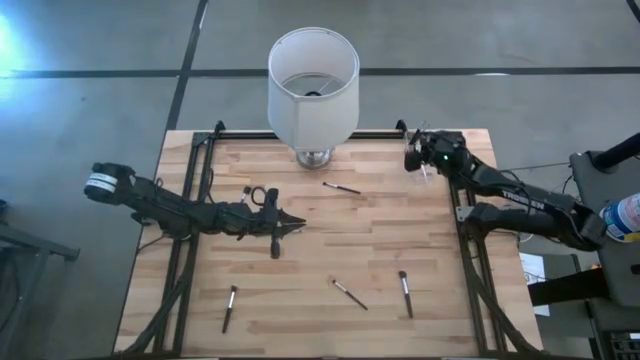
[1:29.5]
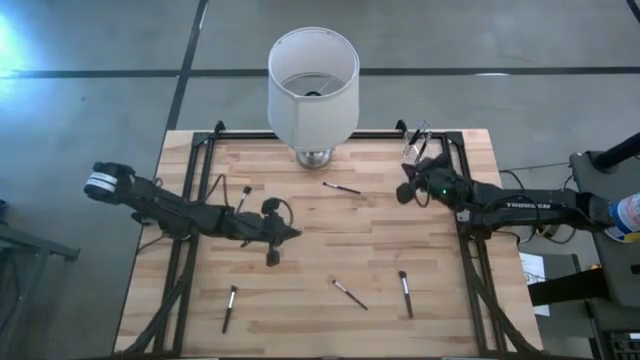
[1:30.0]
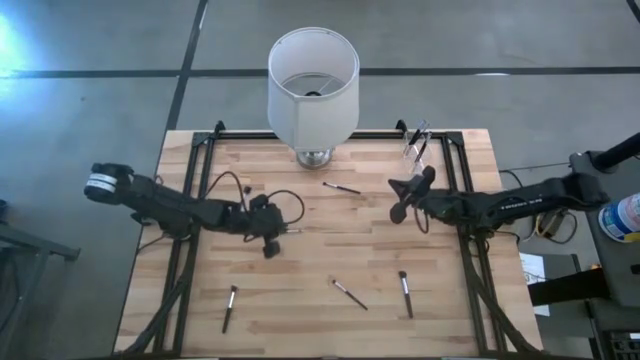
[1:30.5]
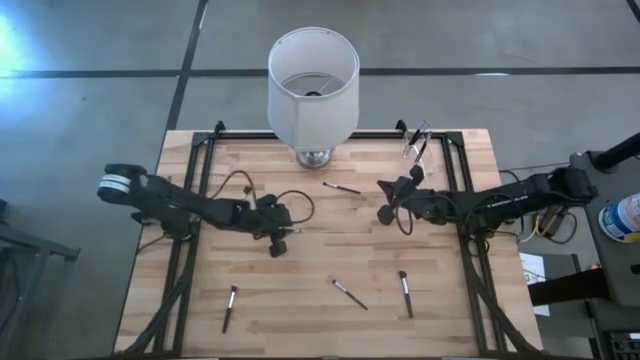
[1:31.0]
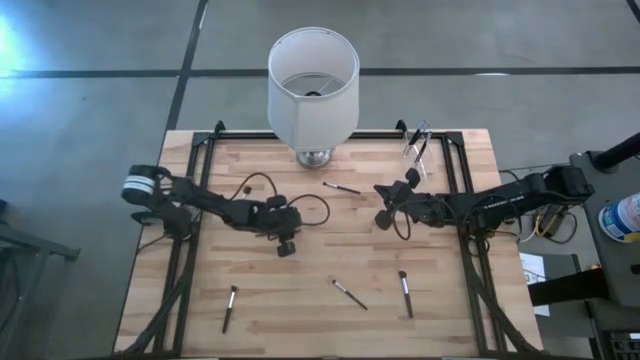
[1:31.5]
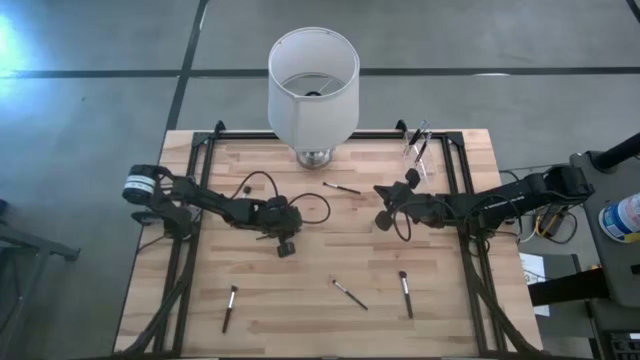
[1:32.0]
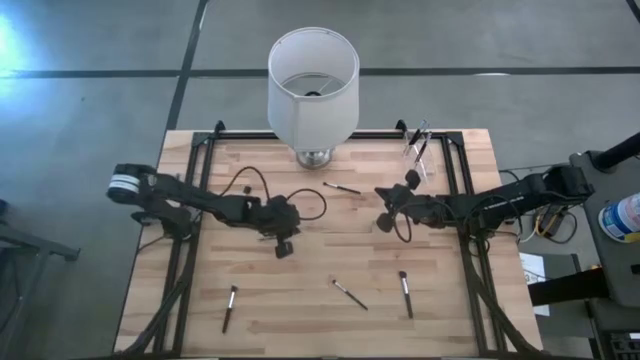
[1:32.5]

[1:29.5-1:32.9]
Task: Put items in baskets/containers
Put the eyeshadow brush into the transparent organizer

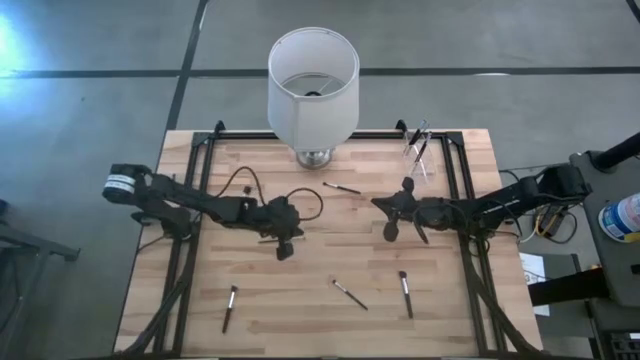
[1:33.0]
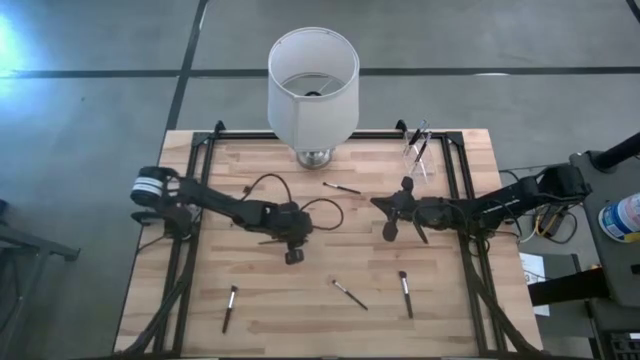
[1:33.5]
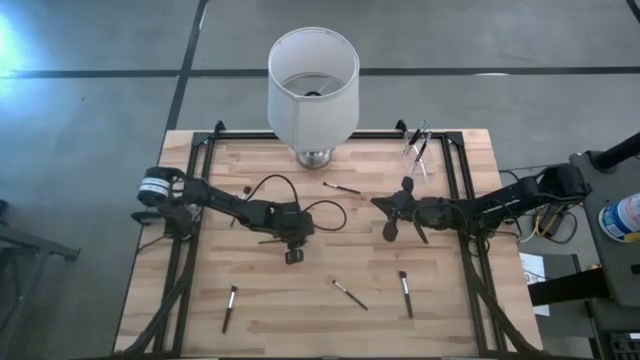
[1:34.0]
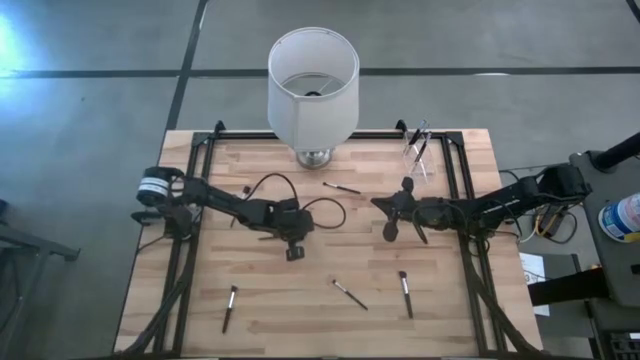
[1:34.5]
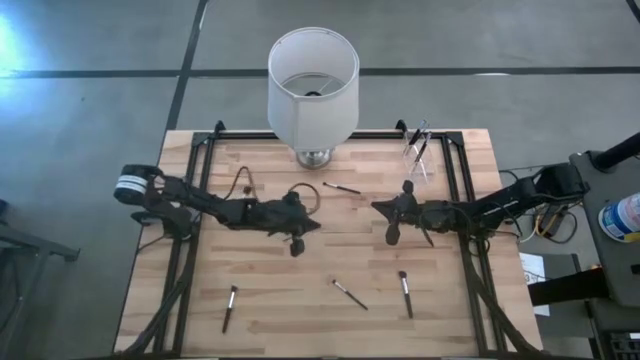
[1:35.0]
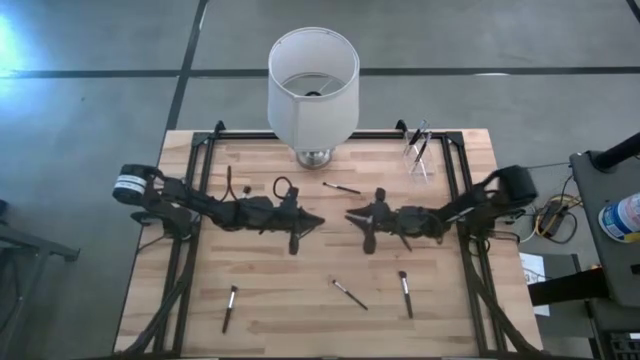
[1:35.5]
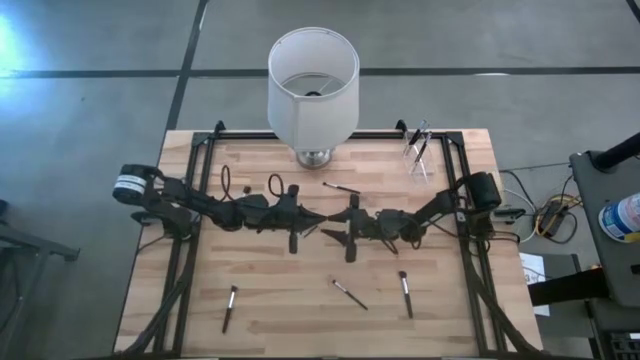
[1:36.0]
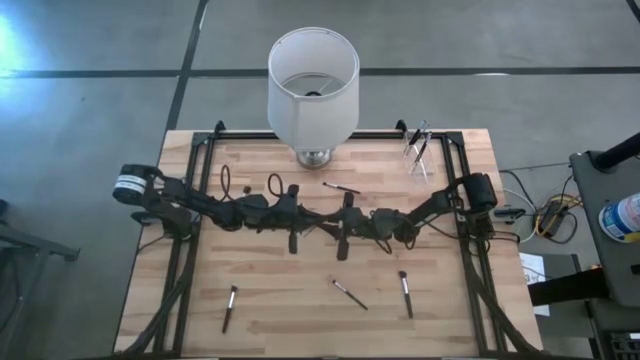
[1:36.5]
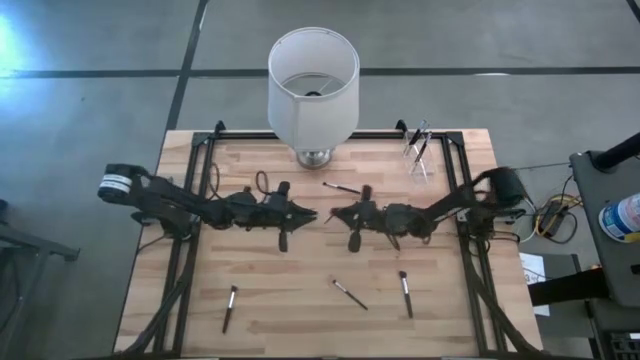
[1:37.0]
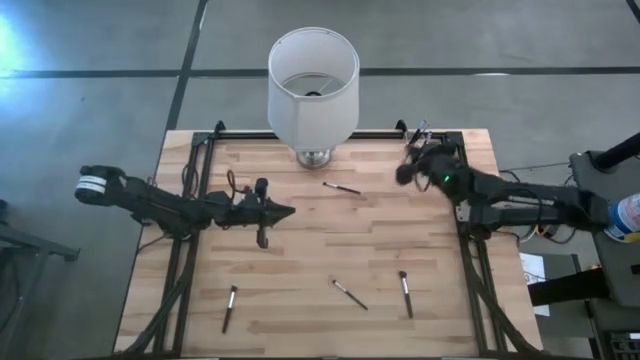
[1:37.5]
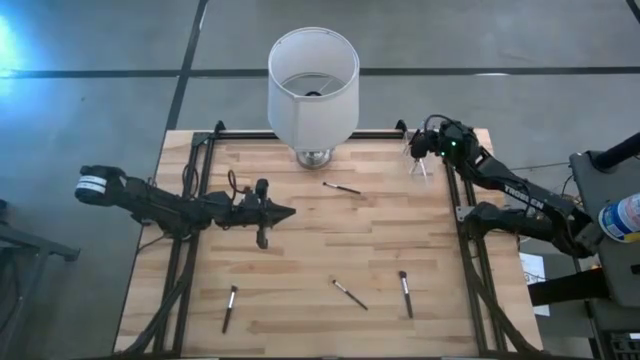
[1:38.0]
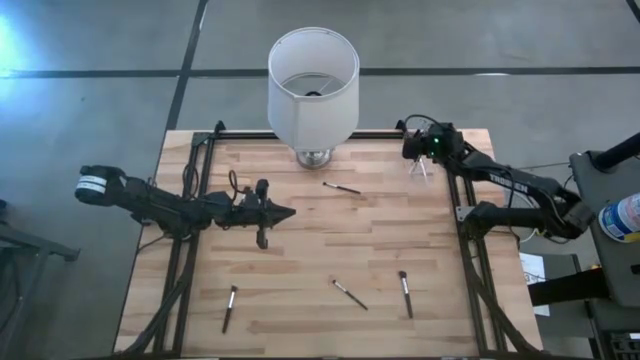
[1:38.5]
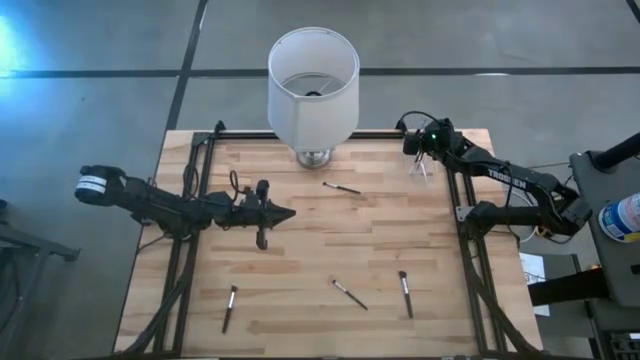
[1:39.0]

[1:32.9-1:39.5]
Put the eyeshadow brush into the transparent organizer

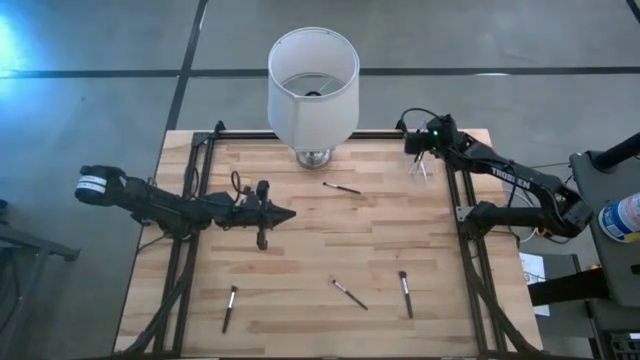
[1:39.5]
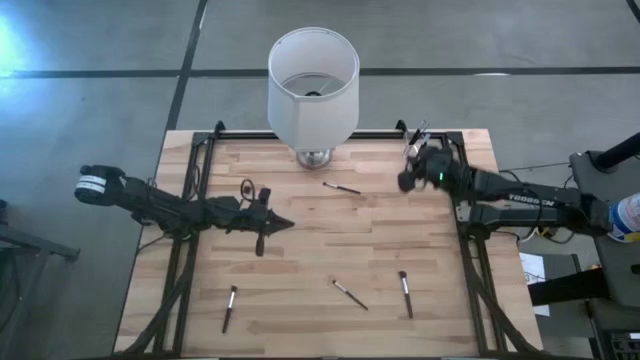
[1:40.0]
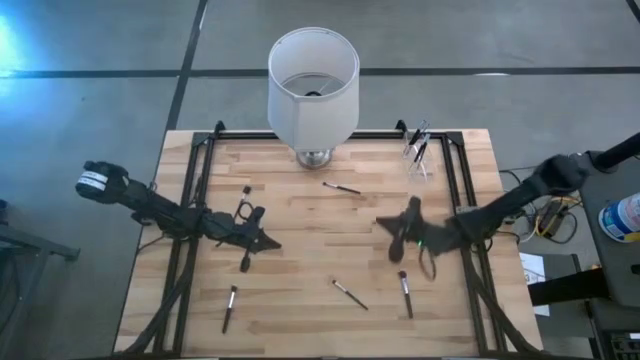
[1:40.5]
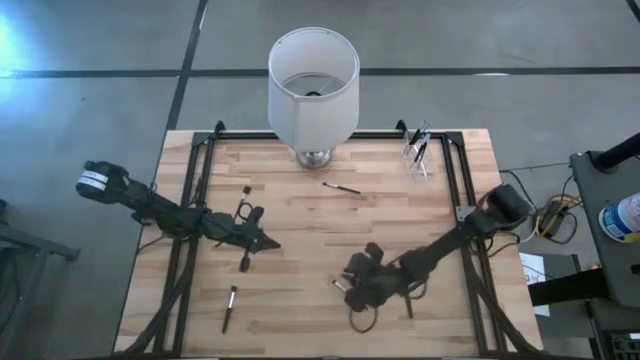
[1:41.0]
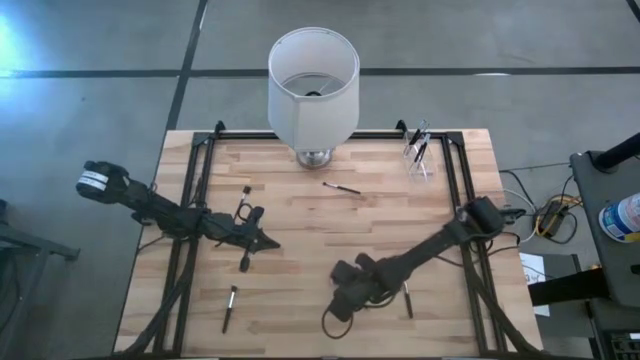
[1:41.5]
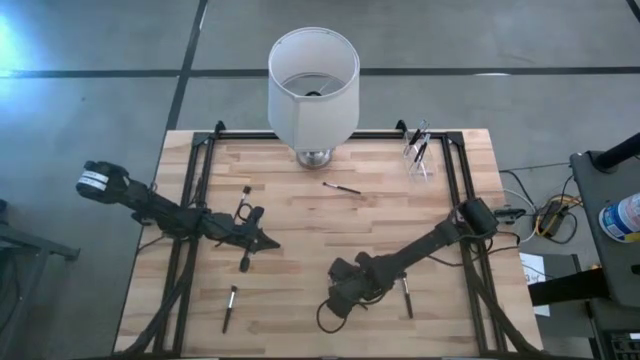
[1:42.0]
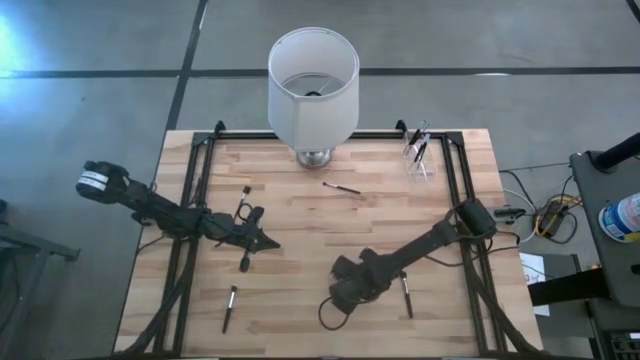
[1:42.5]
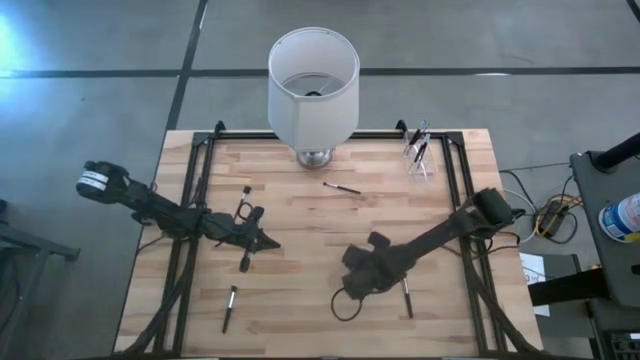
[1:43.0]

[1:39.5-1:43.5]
Put the eyeshadow brush into the transparent organizer

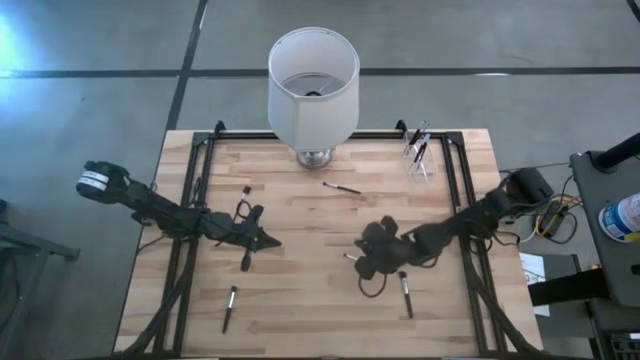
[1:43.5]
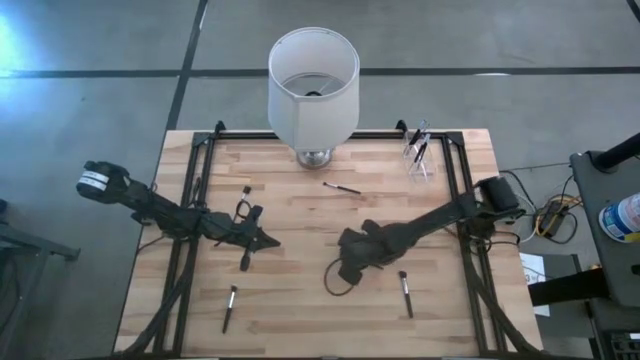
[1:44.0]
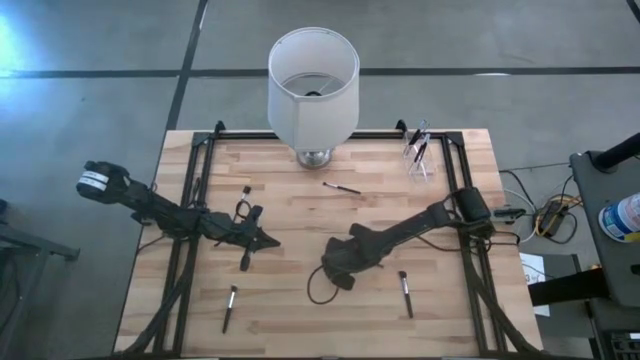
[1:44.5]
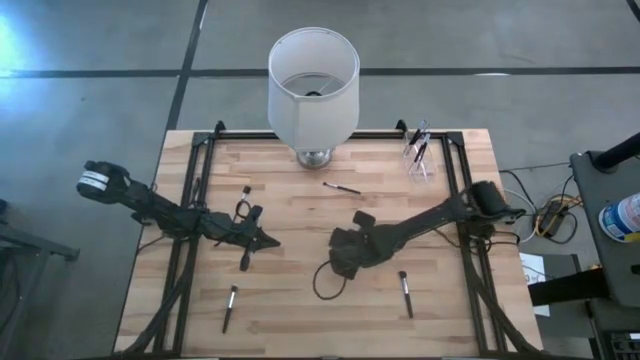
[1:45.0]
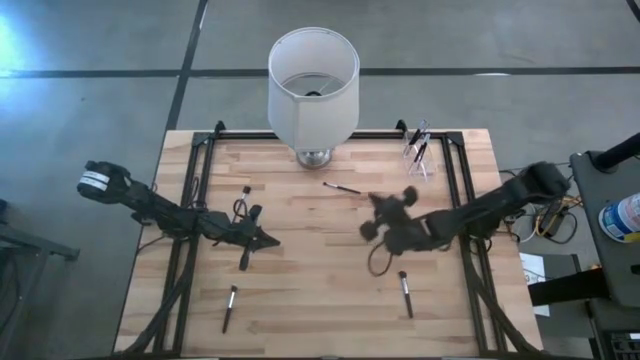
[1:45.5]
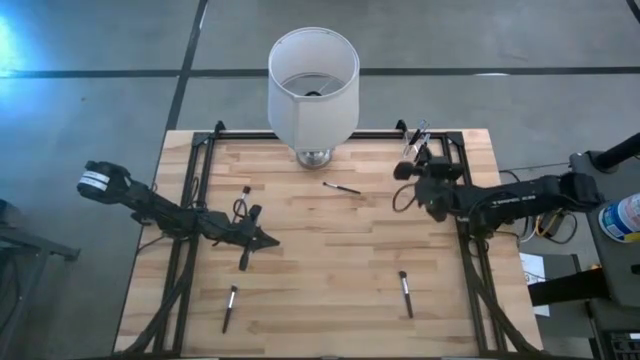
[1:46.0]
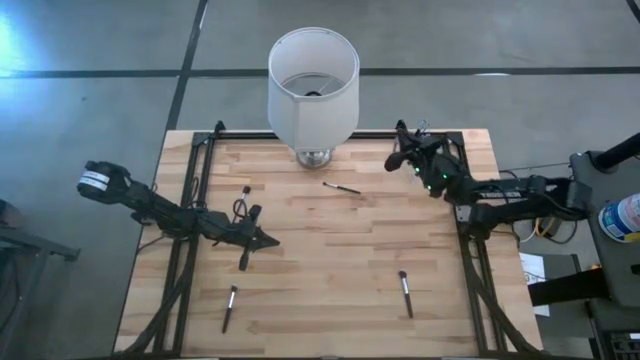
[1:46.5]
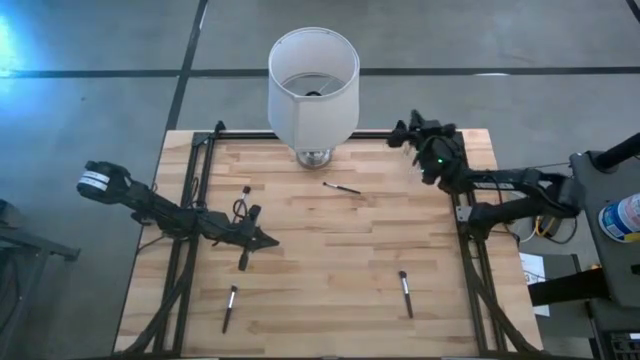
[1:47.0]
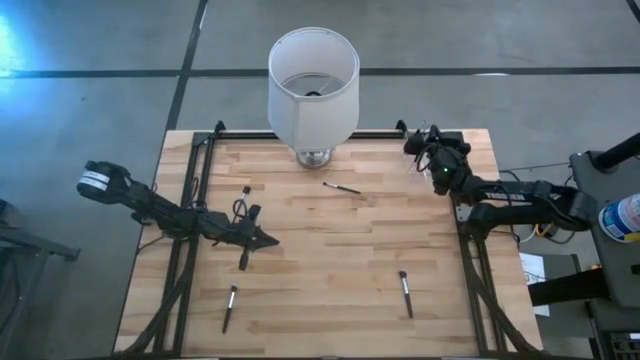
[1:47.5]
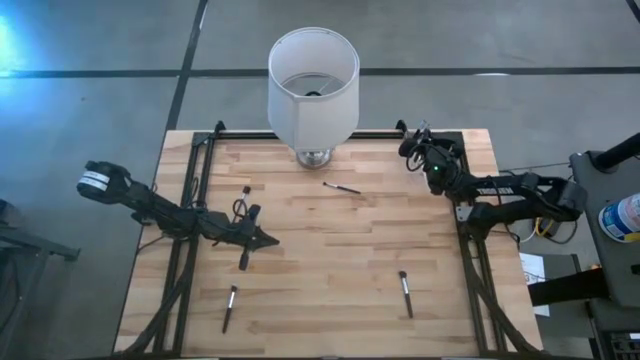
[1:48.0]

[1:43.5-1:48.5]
Put the eyeshadow brush into the transparent organizer
